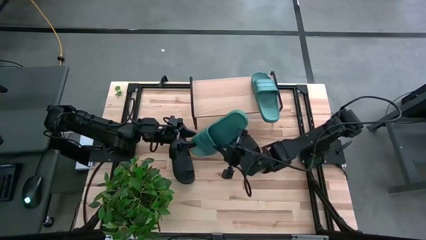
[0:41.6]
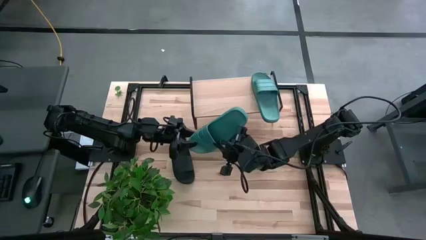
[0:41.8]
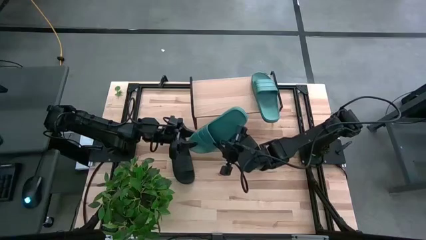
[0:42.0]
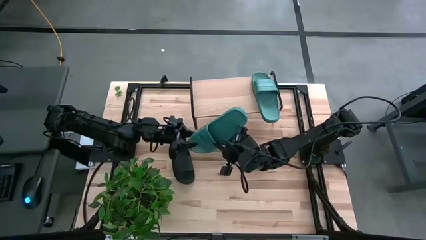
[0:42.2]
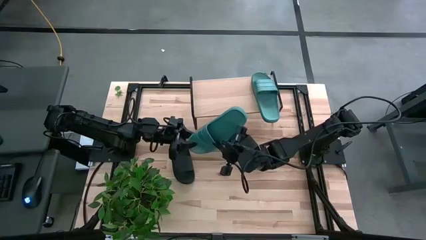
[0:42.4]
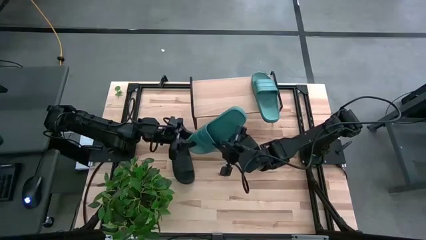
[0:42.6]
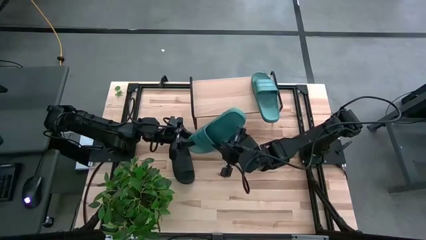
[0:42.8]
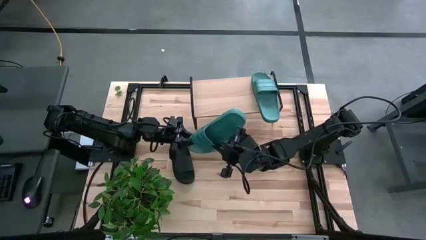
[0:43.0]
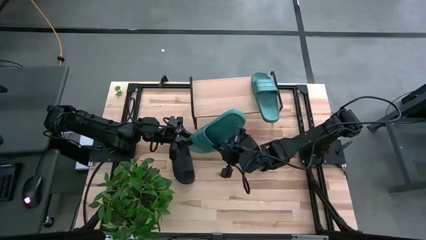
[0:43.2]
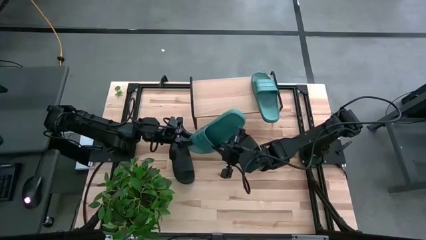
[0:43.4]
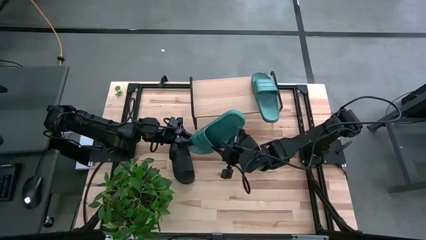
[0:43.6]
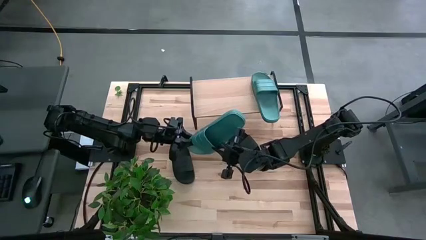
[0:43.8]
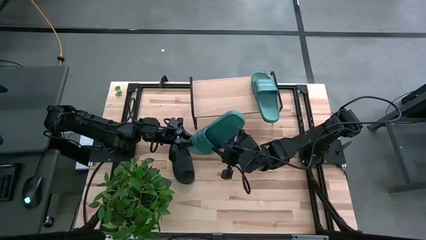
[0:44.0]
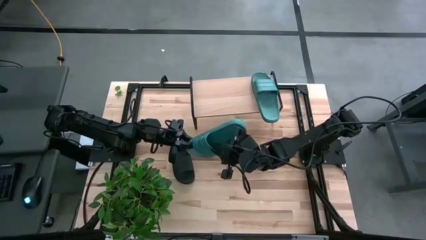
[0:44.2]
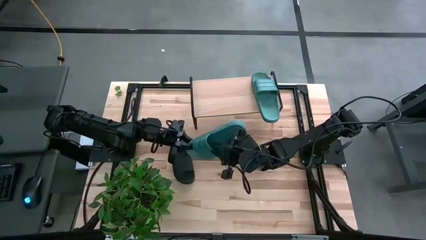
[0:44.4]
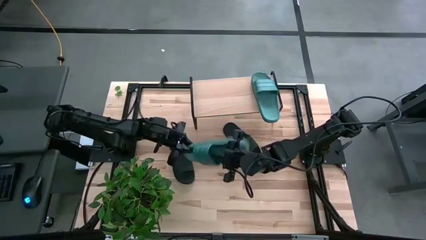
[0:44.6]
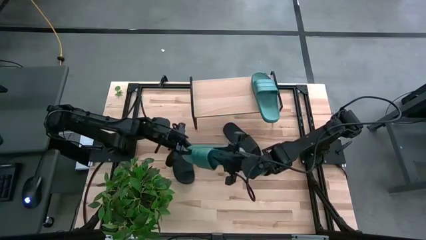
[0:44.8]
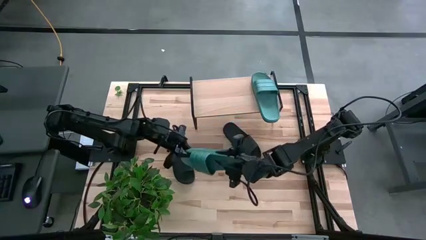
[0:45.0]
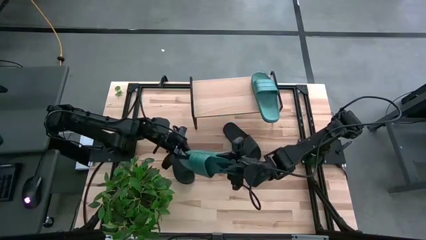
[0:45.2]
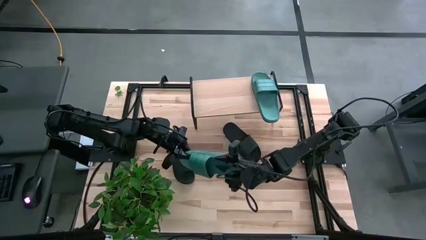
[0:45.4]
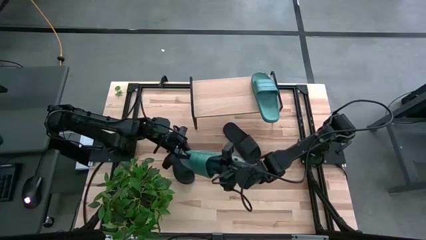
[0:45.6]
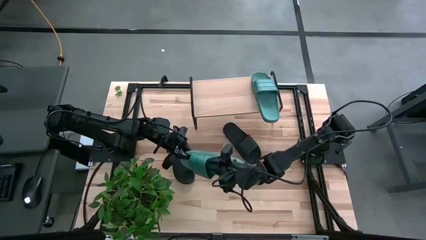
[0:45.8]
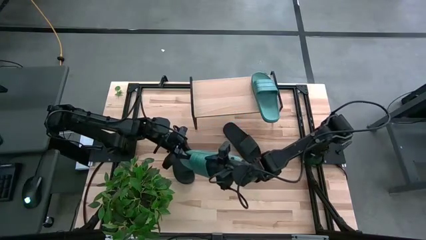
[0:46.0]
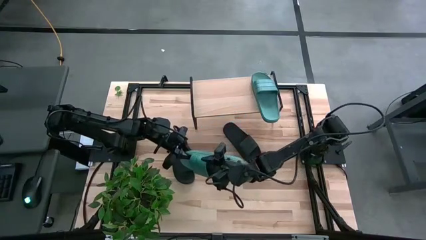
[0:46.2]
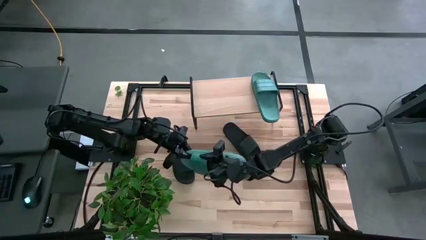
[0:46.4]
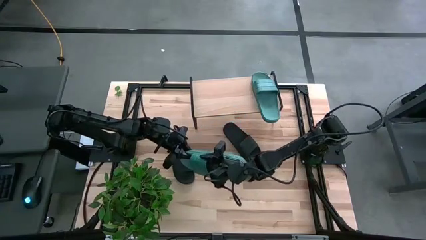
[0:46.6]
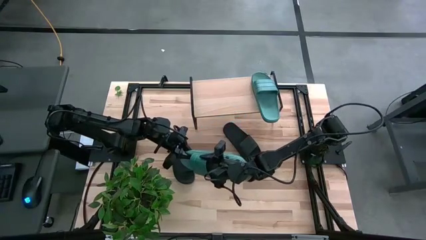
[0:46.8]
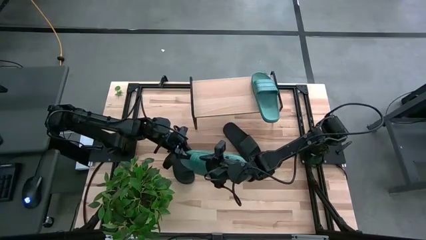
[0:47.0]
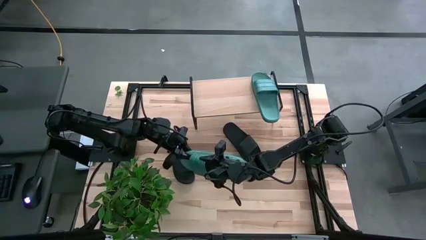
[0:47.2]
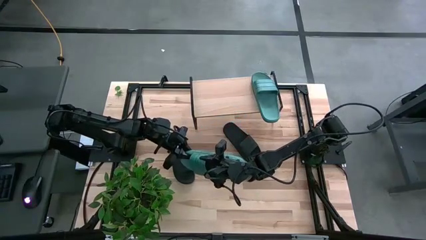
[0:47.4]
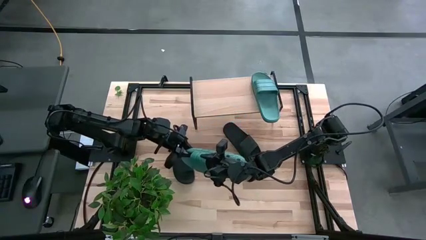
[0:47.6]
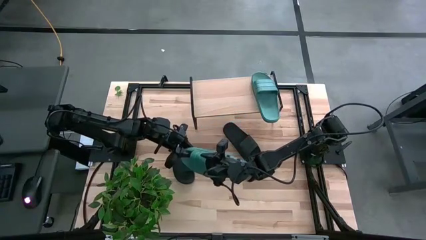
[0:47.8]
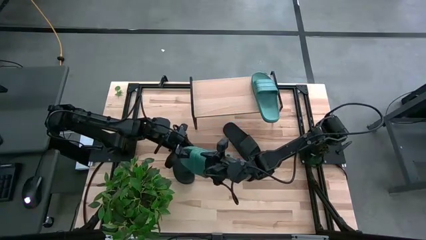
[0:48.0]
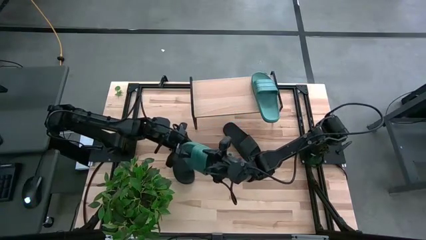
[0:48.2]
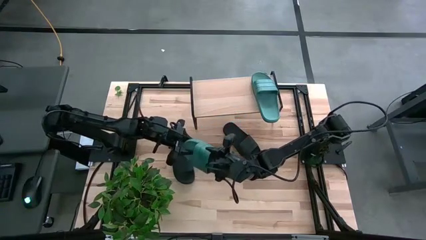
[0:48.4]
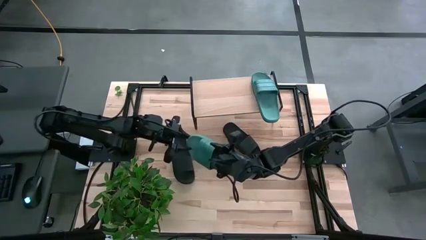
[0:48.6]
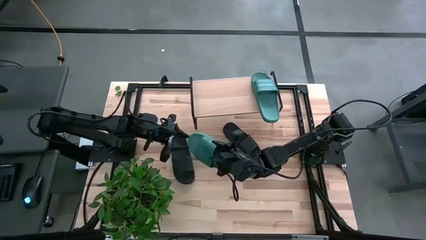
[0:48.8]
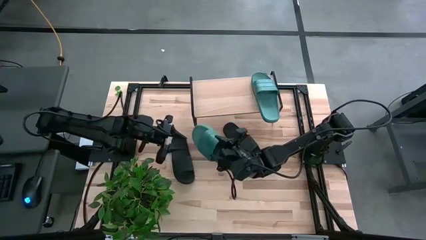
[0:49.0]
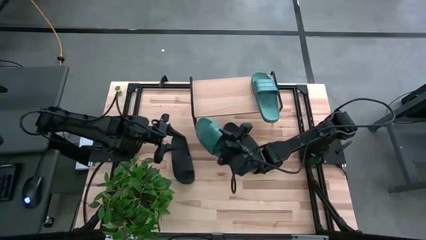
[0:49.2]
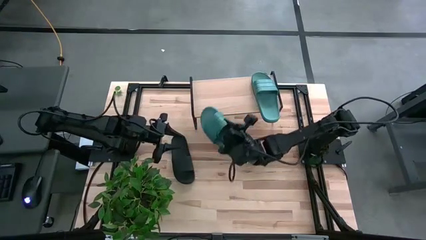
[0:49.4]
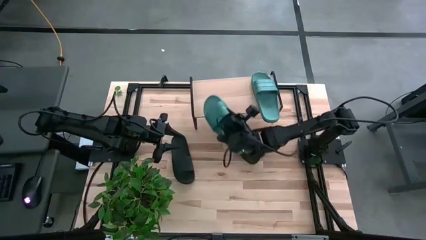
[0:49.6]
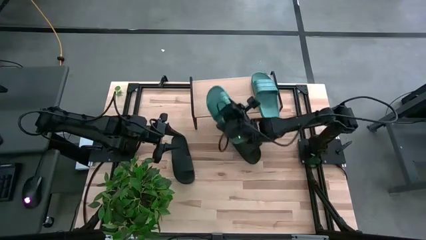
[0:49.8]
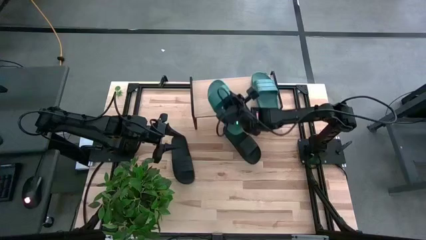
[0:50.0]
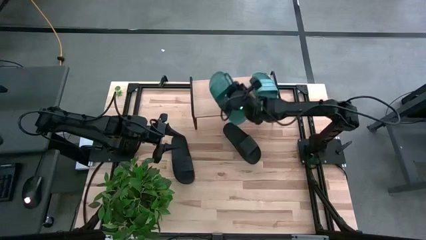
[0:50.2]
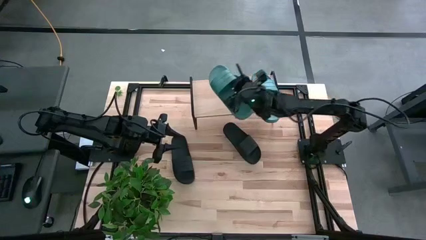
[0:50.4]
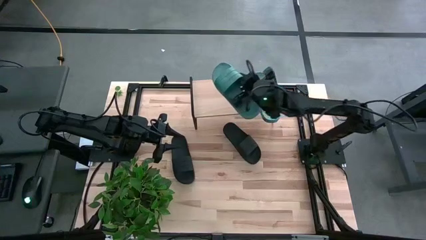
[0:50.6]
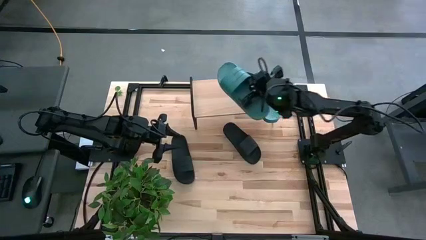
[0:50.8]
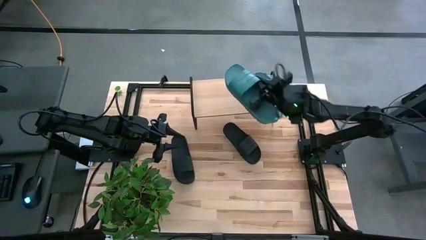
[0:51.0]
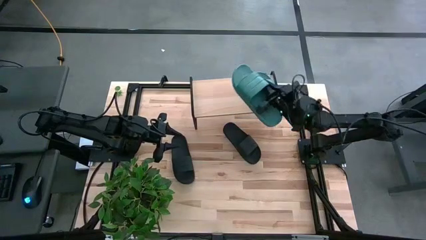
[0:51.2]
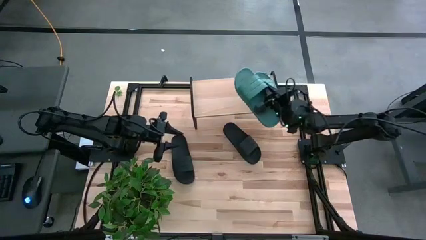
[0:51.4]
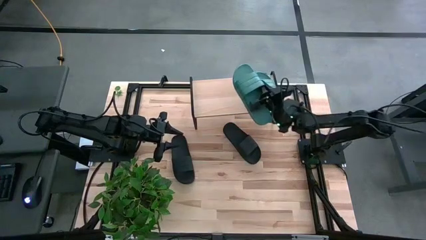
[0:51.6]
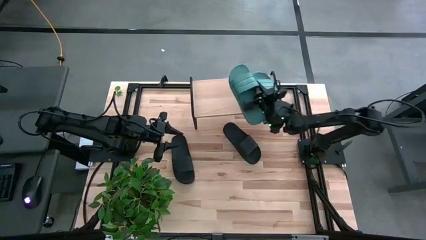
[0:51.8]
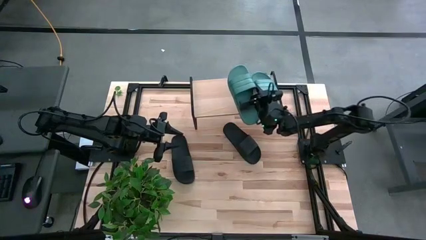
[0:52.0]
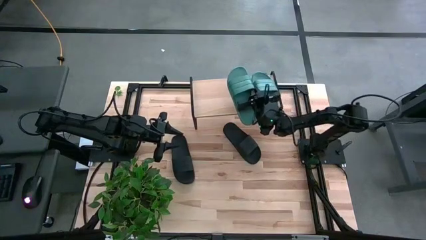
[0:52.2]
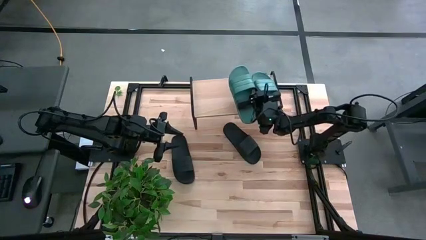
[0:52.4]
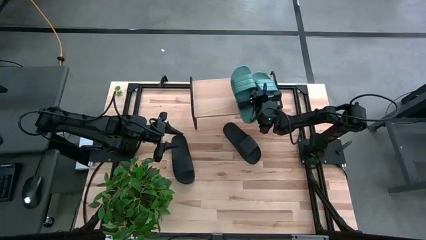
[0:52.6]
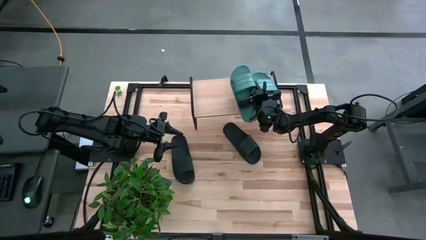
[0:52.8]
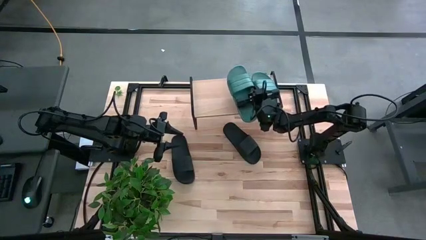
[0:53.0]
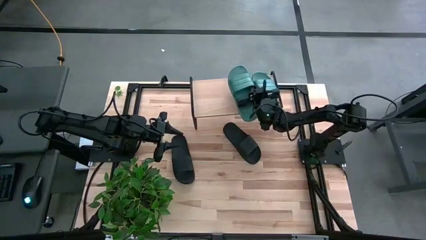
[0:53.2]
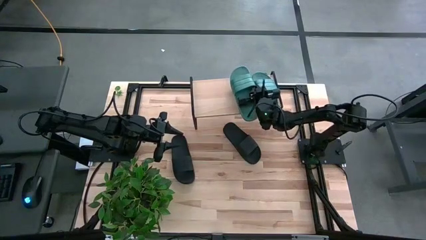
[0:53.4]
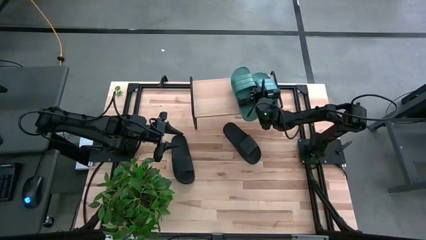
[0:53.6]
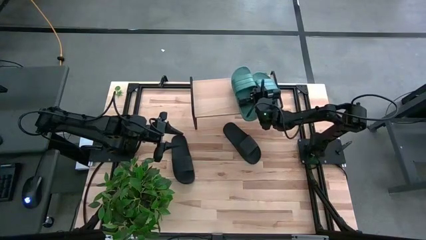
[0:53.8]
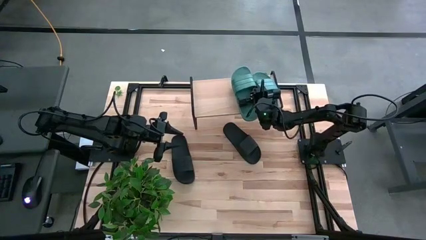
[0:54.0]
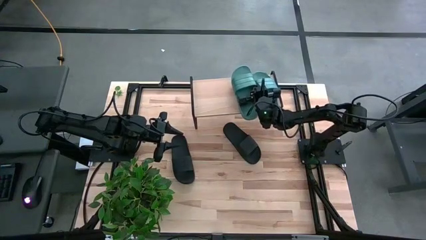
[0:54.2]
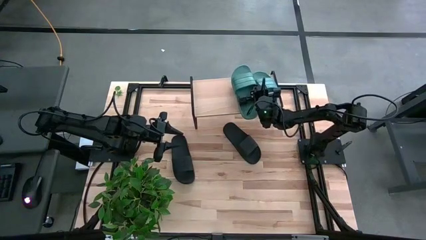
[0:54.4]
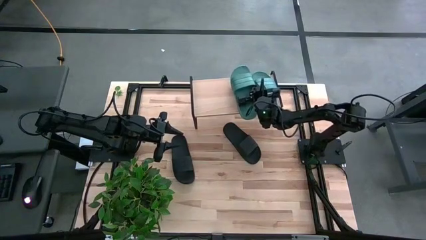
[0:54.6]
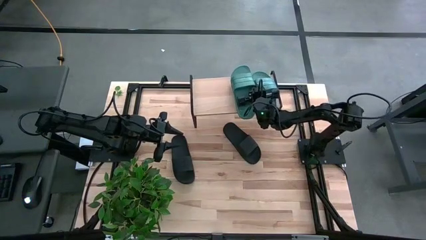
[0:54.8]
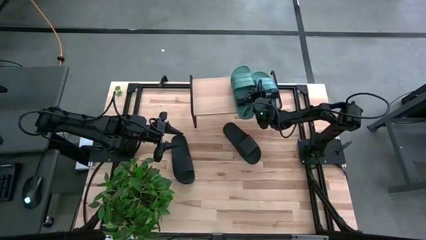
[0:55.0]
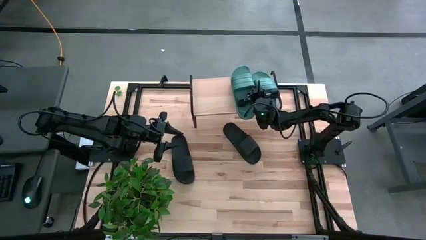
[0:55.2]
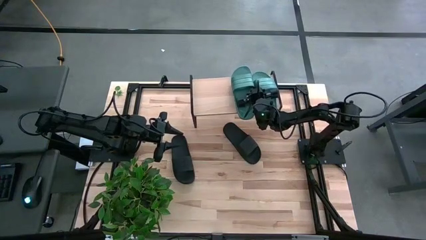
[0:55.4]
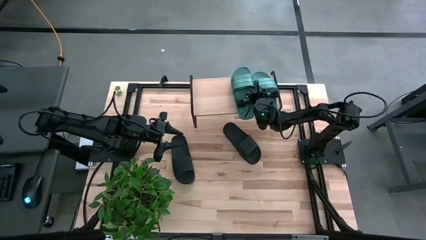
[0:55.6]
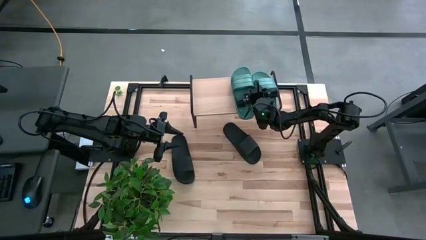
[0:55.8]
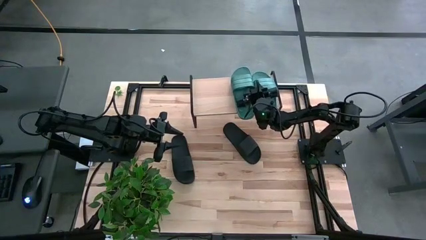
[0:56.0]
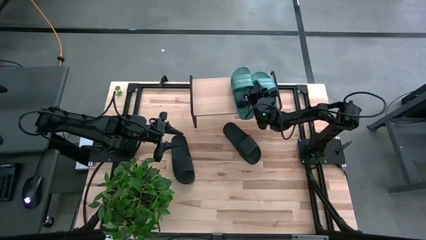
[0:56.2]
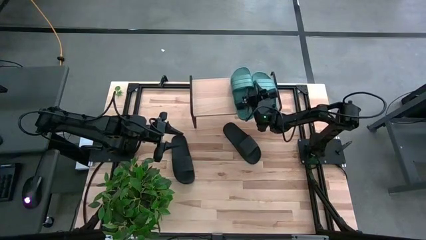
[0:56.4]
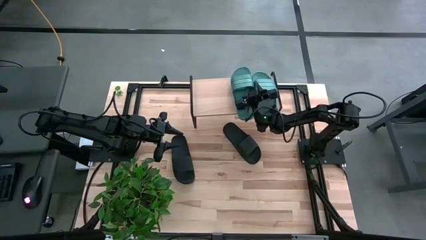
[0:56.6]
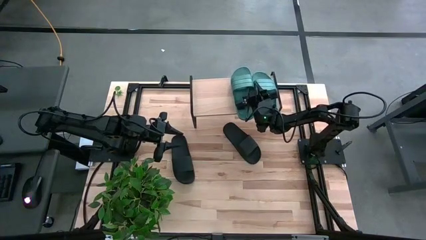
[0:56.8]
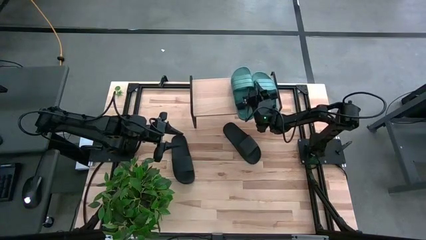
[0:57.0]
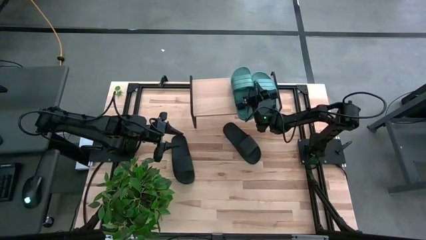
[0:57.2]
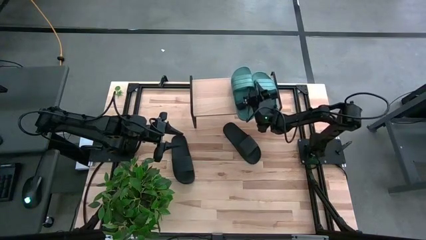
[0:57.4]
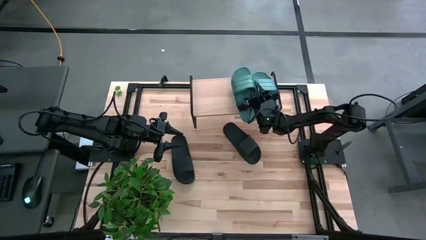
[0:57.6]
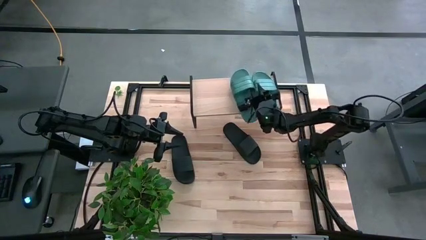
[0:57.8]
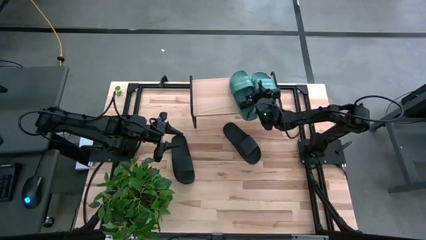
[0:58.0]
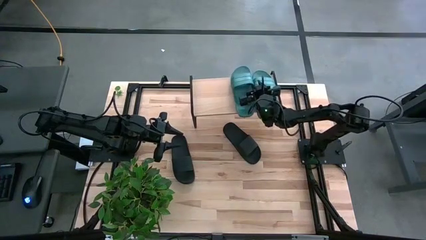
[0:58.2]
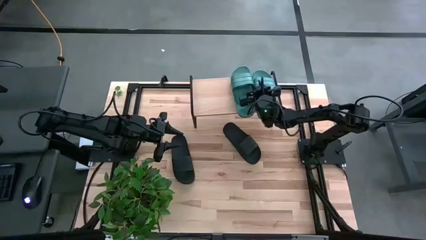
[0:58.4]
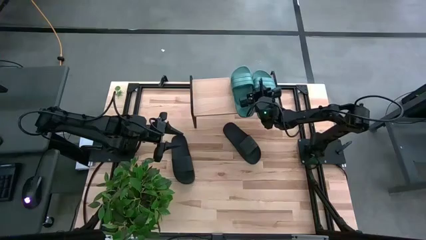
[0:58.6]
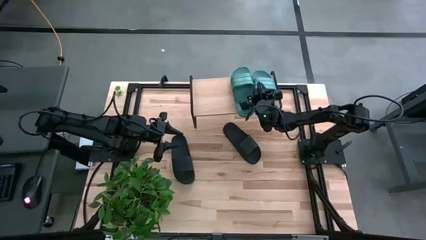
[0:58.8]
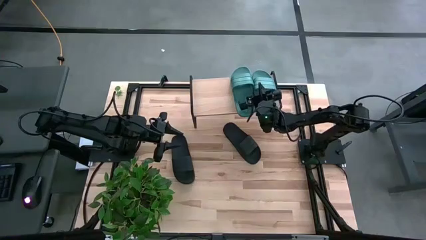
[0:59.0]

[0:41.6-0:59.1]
Task: Pick and place slides into the shelf
Put the green slipper on the shelf
